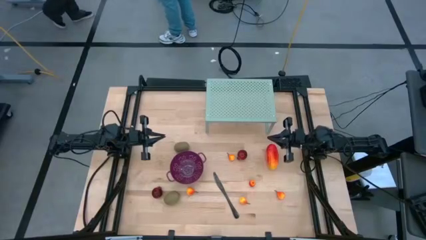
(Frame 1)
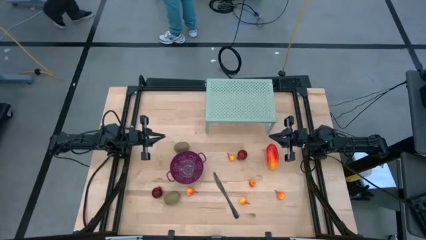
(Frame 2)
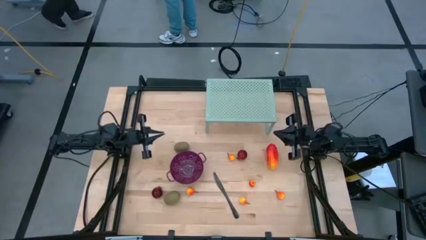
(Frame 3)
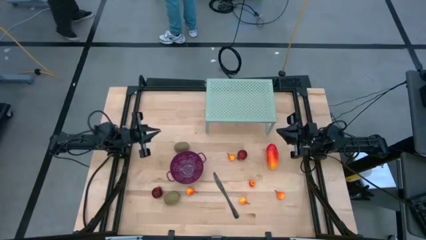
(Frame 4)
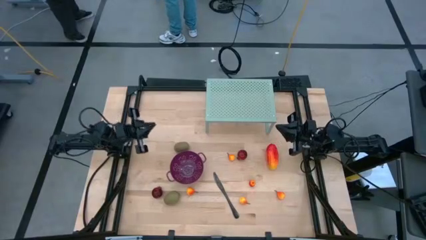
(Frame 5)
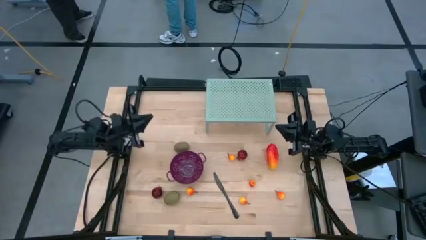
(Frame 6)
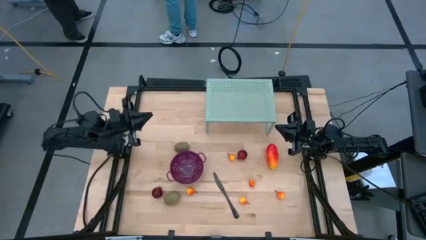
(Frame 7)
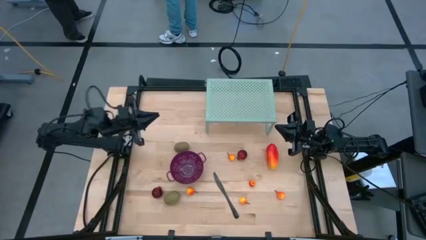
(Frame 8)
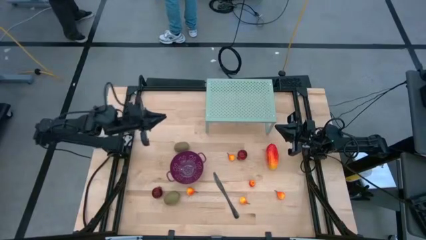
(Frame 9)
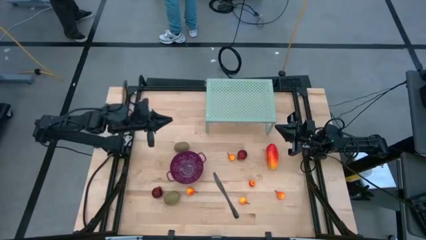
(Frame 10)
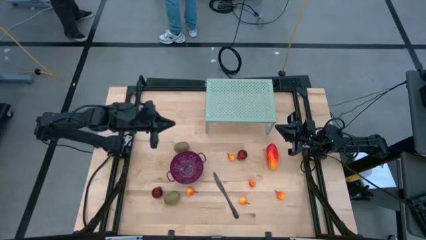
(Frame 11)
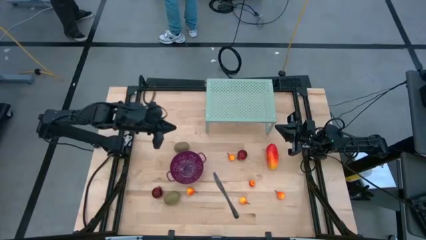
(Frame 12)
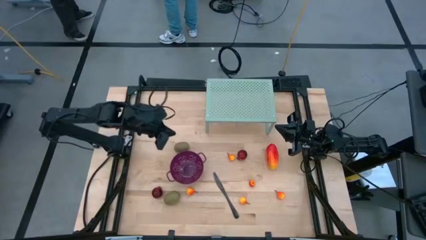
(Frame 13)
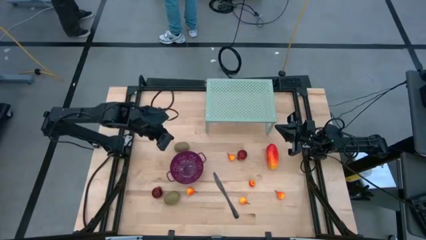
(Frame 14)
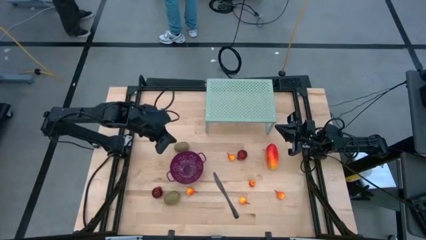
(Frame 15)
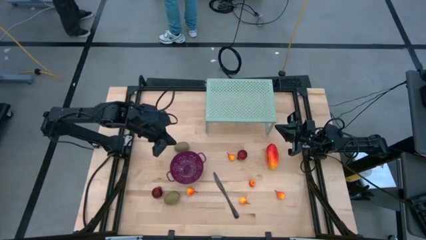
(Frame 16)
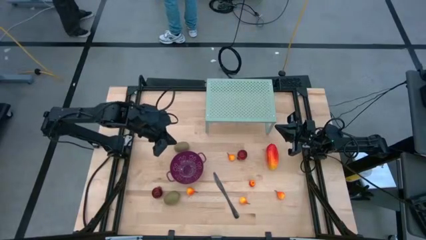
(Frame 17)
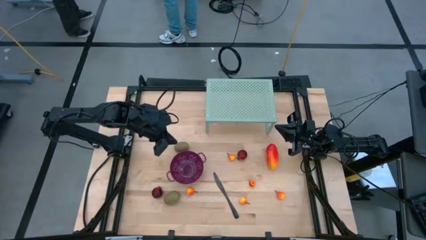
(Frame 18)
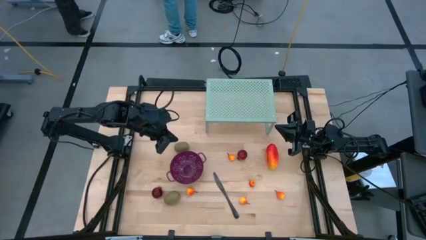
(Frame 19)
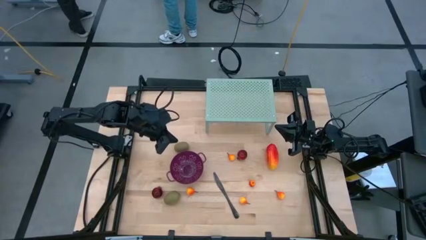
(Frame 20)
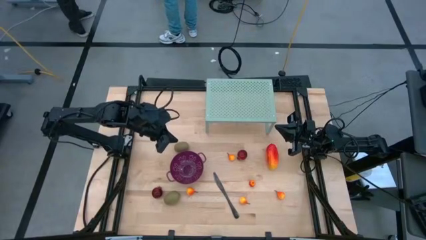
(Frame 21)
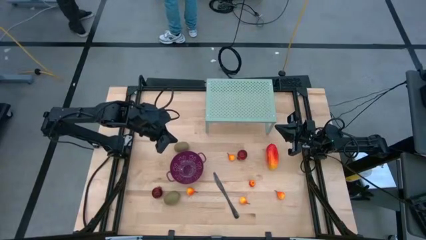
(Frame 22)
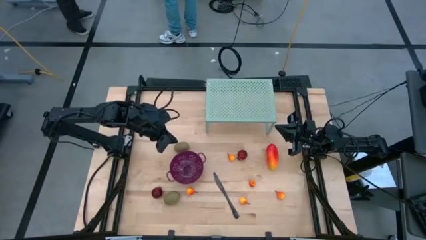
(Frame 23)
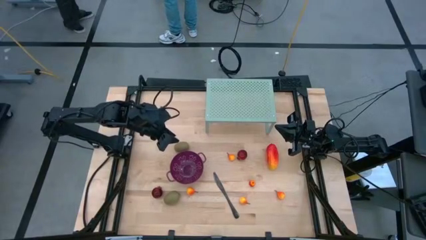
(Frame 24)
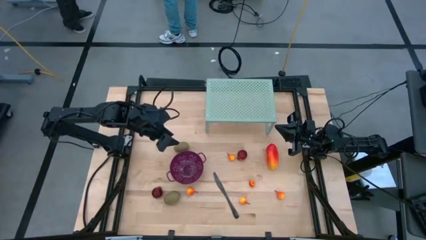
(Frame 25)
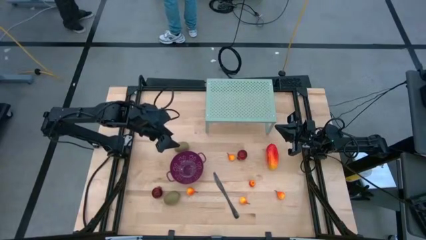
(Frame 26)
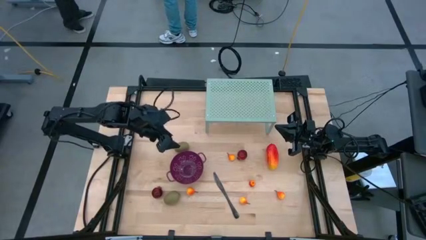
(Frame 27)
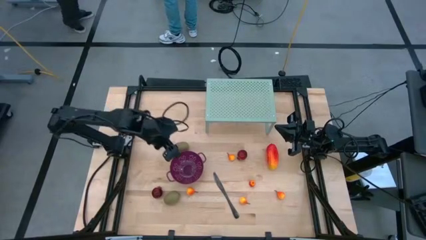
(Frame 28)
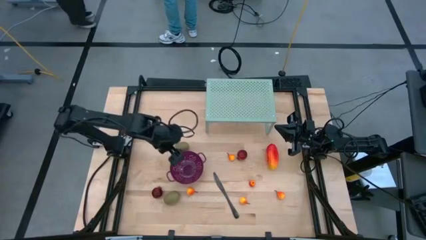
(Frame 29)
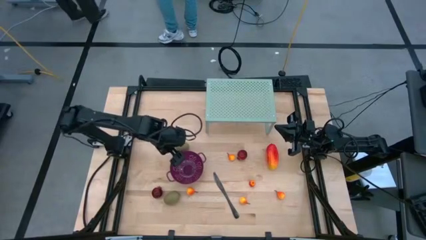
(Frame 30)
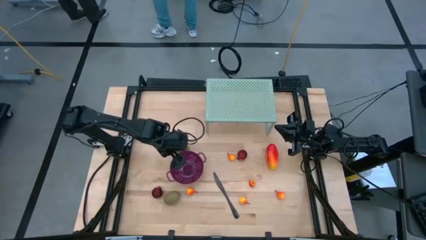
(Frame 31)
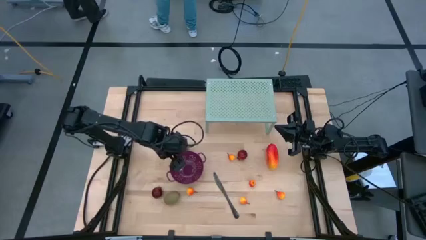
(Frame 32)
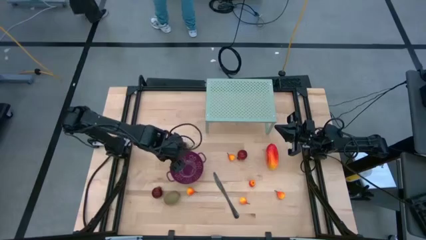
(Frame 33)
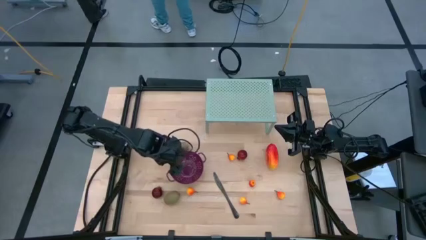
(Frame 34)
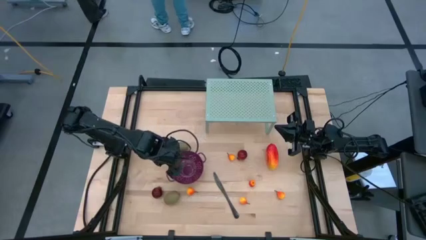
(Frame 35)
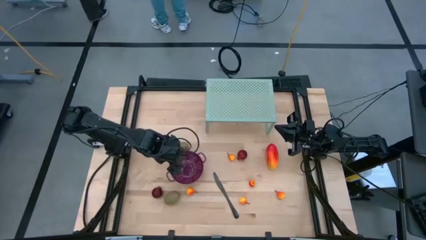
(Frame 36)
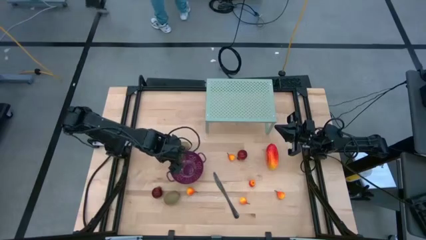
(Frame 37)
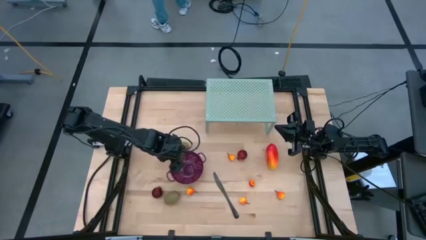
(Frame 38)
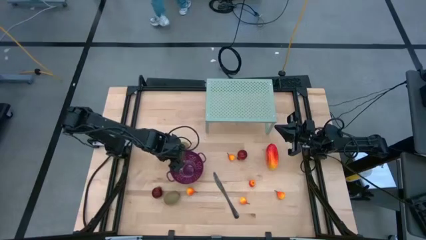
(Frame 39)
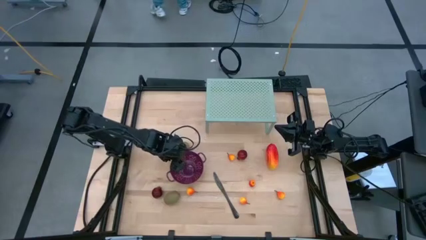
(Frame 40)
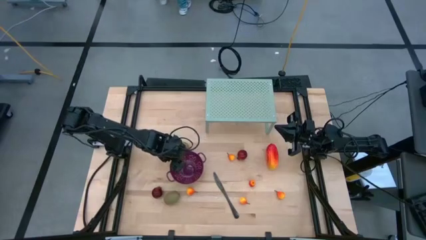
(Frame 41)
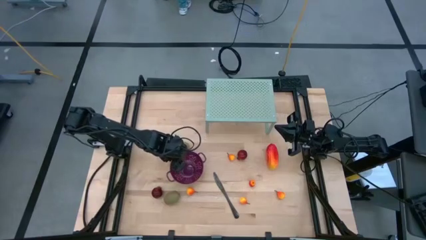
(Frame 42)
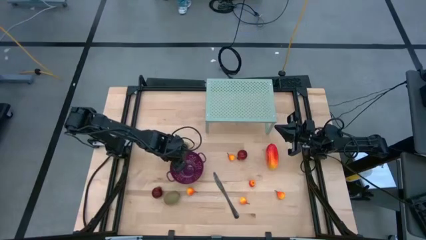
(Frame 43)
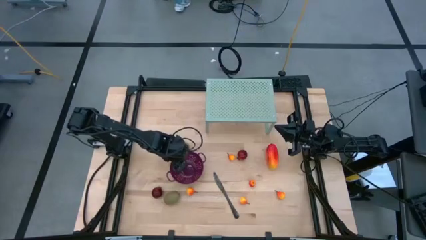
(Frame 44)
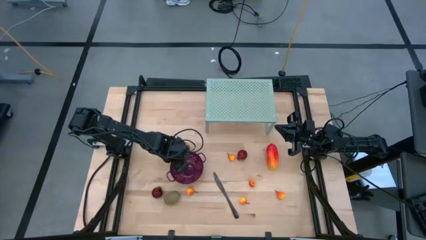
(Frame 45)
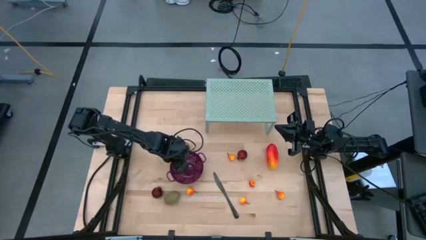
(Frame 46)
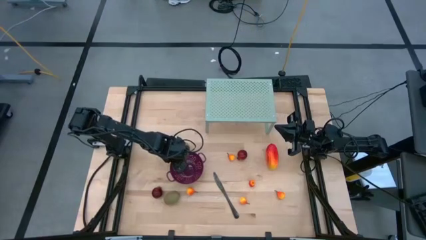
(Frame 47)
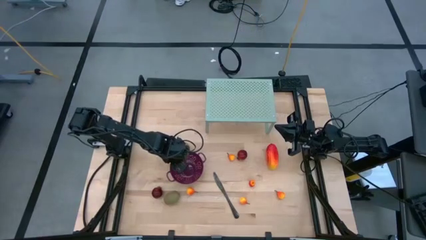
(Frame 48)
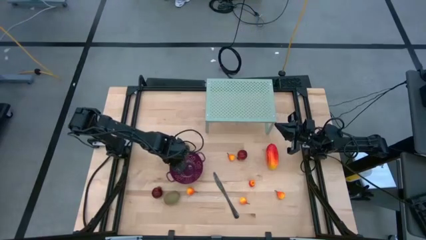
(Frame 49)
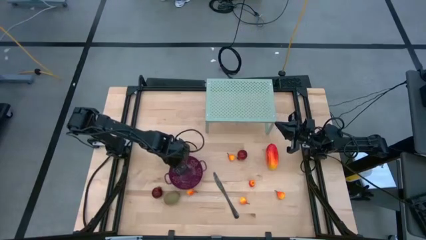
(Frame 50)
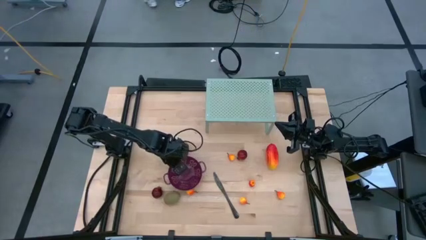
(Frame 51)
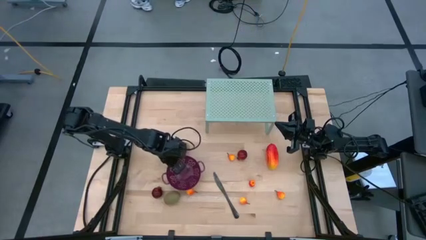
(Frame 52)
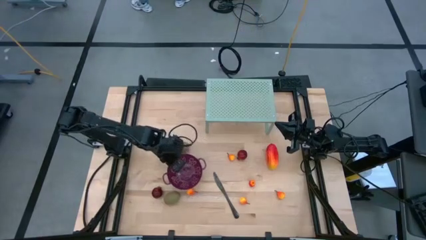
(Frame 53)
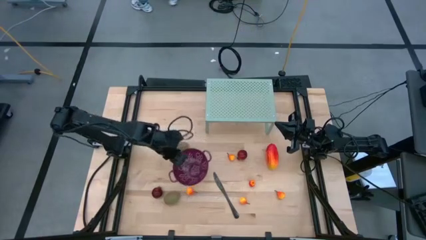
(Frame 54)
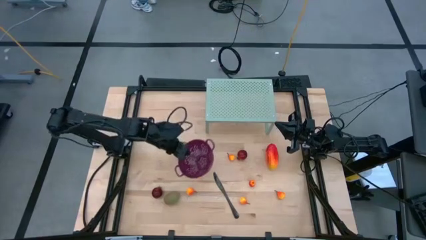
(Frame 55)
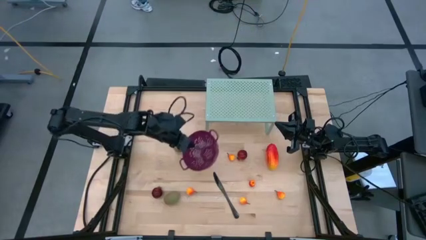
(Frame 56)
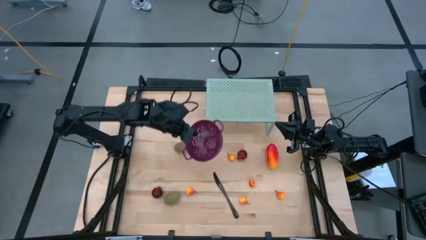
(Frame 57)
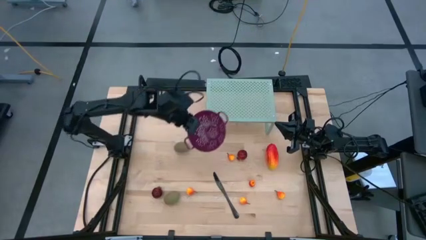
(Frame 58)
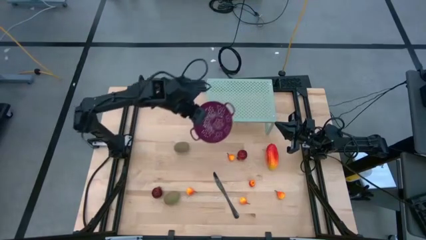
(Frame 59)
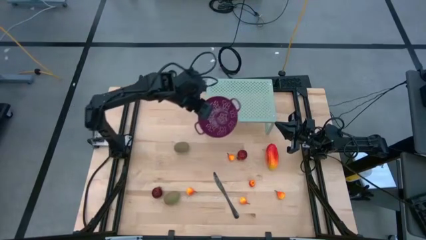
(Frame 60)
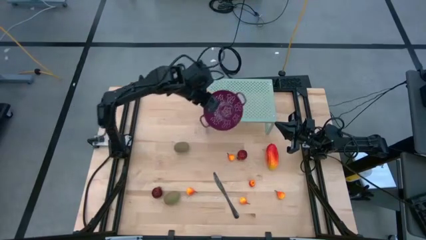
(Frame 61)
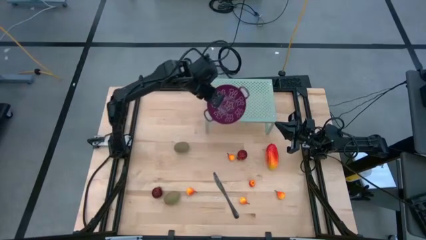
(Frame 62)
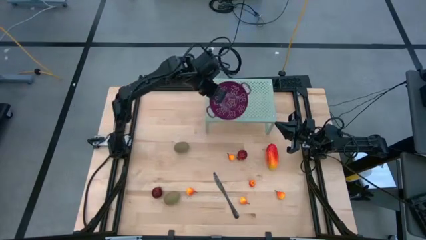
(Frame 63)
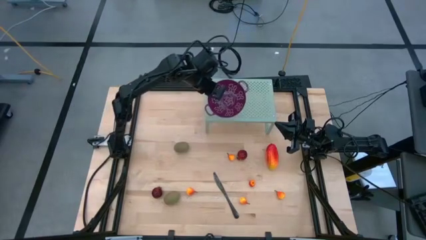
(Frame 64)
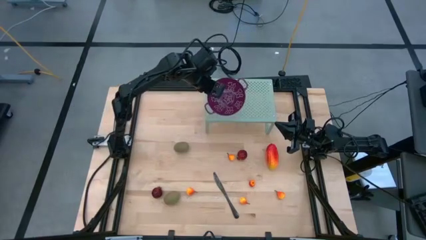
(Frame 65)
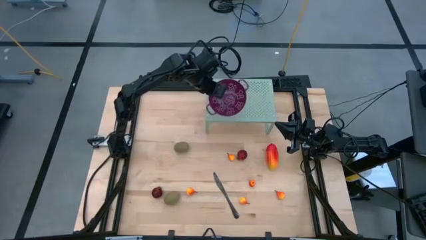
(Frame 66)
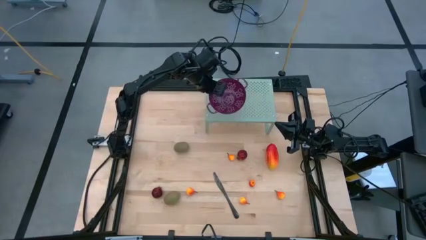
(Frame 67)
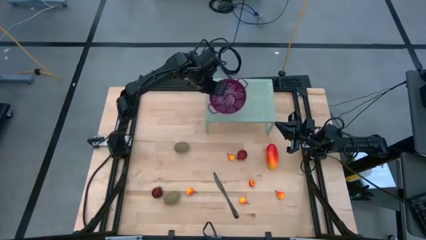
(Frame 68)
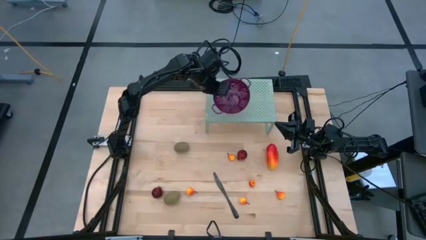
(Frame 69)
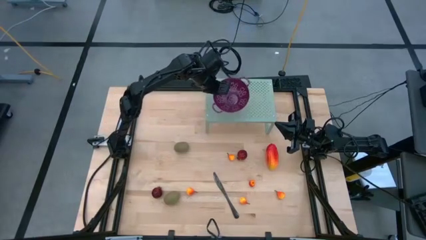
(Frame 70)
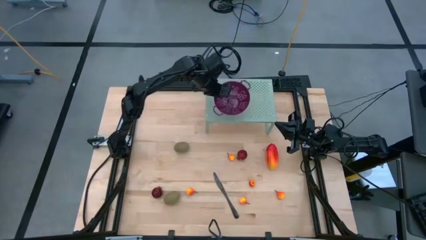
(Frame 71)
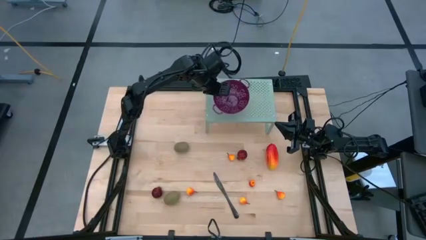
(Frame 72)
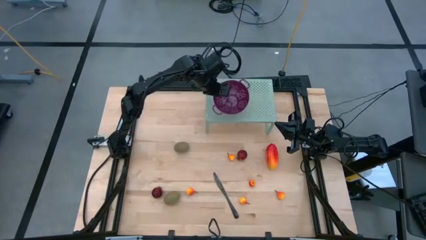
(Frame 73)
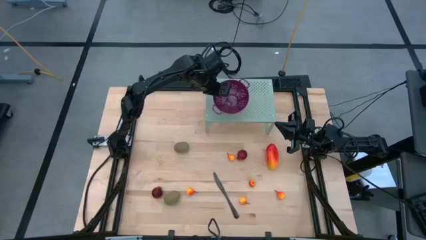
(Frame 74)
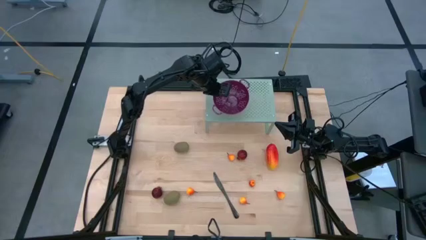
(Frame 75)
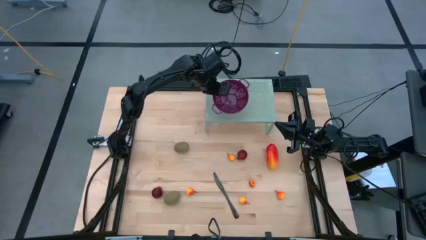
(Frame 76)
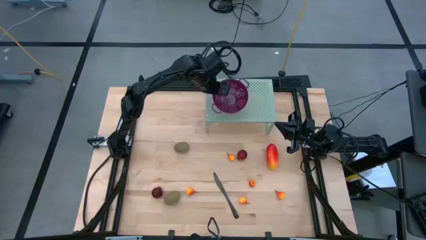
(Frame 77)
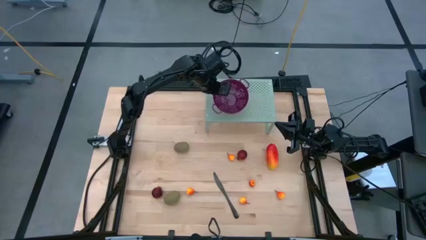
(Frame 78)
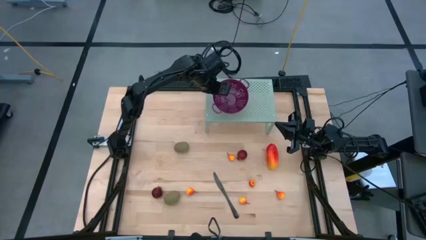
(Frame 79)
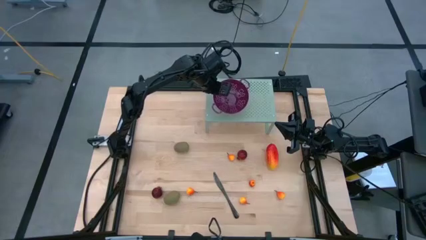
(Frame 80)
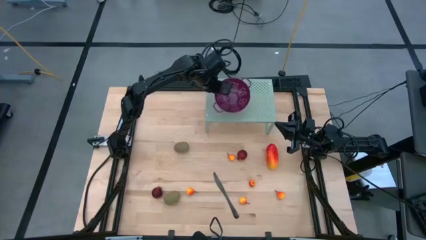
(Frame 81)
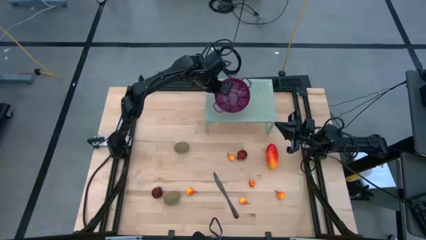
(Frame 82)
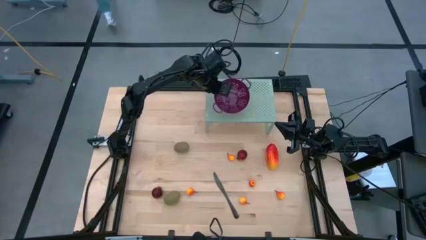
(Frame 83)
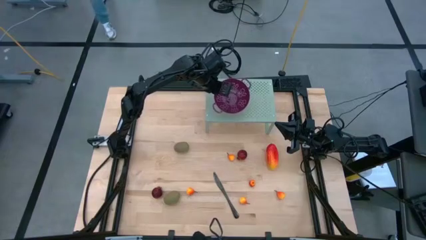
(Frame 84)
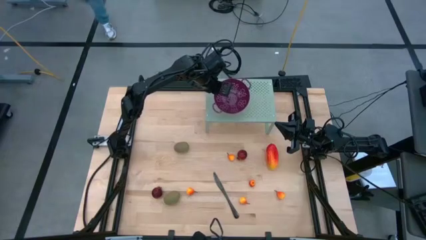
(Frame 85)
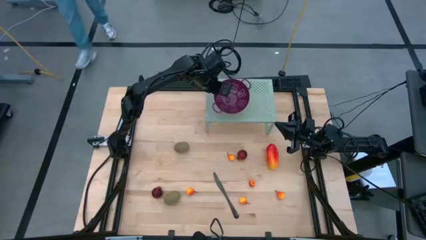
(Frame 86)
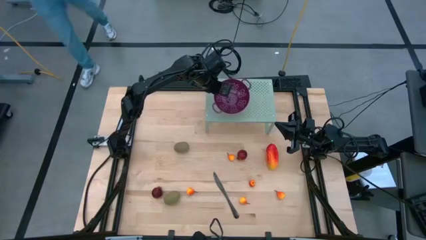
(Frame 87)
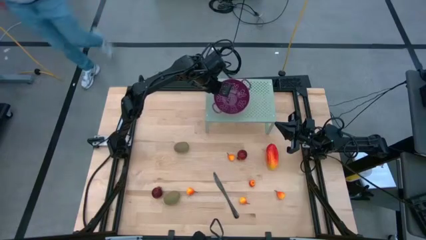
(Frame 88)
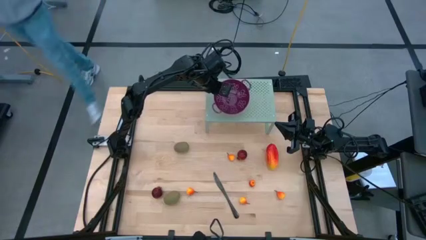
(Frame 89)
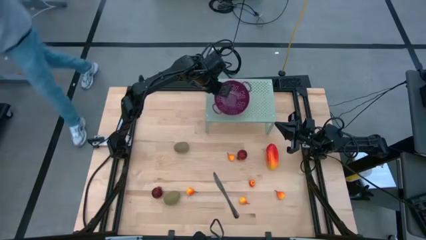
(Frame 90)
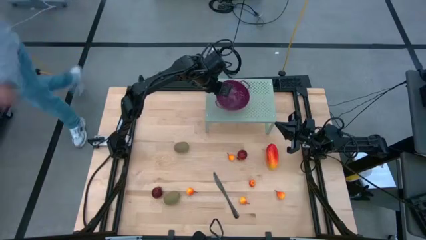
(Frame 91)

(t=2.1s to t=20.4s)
Task: Pick & Place Fruit
Put the violet strainer bowl on the shelf
